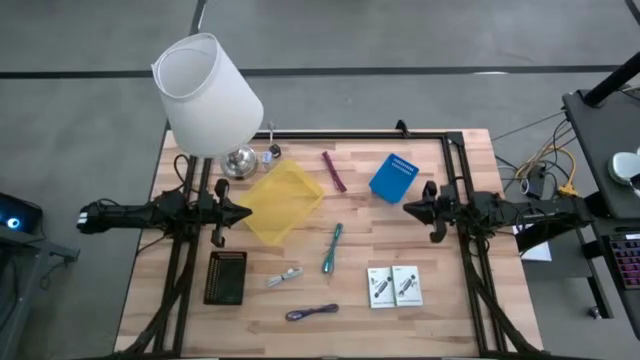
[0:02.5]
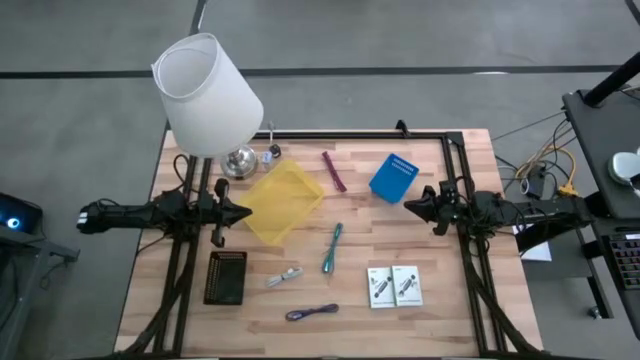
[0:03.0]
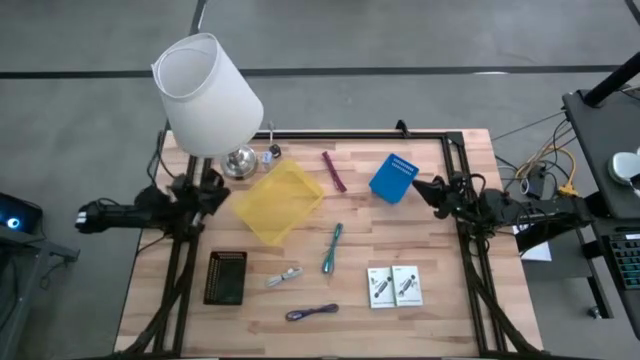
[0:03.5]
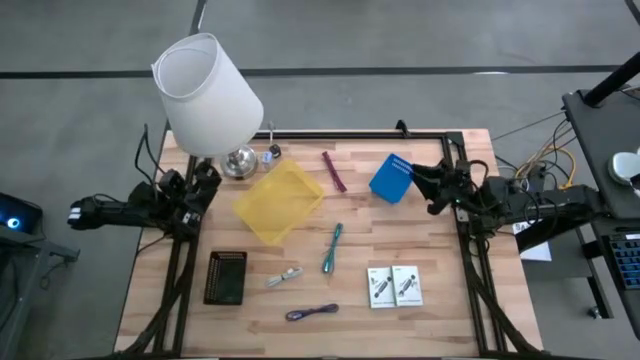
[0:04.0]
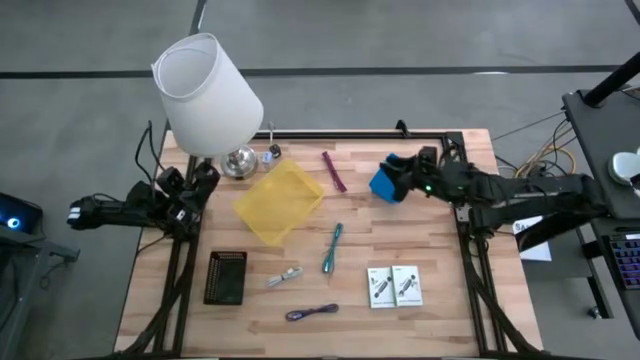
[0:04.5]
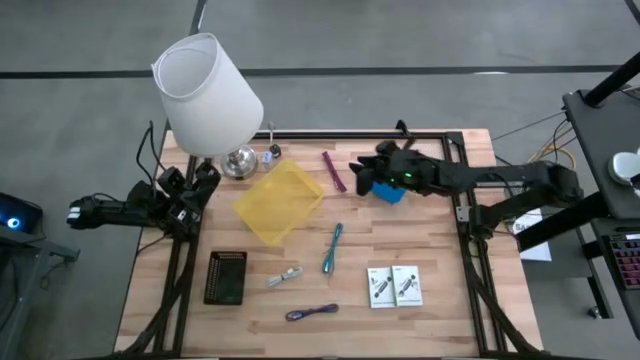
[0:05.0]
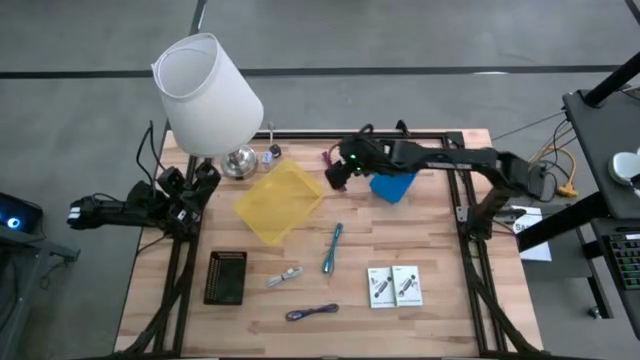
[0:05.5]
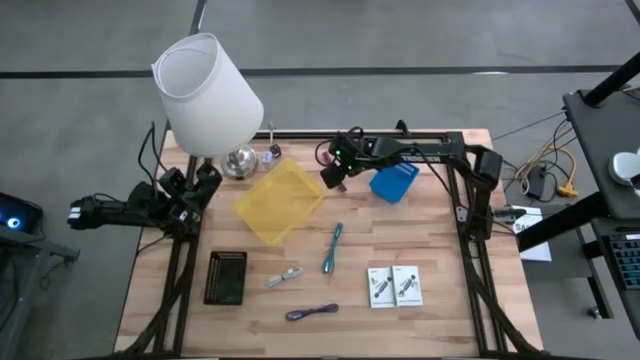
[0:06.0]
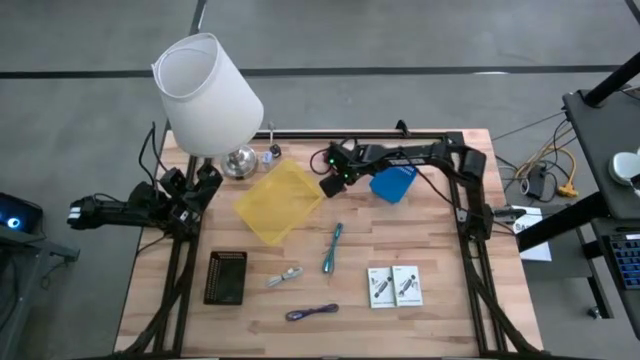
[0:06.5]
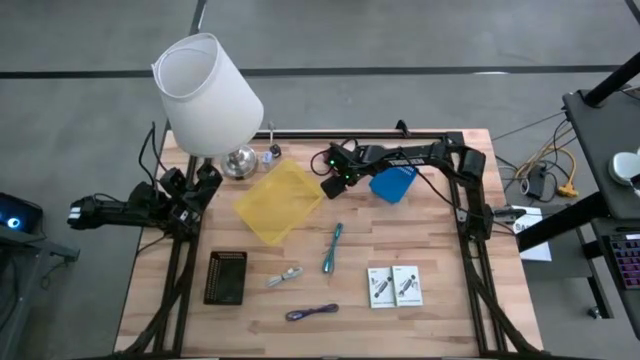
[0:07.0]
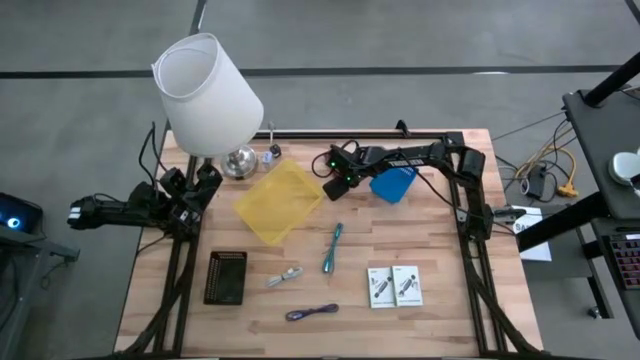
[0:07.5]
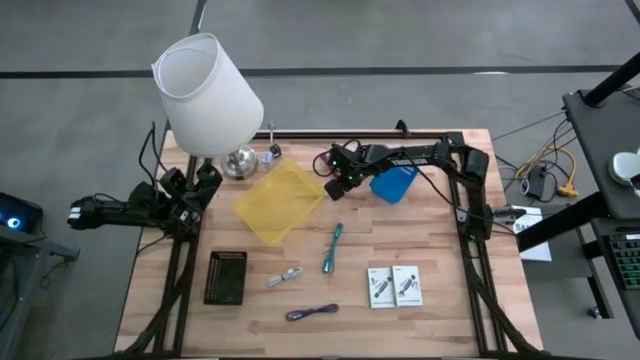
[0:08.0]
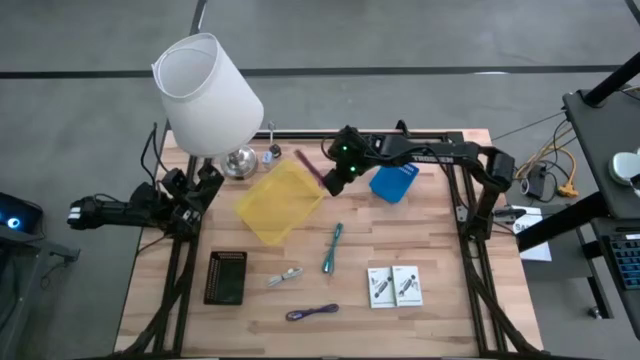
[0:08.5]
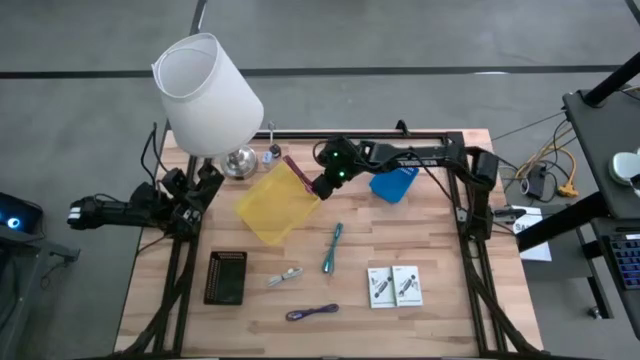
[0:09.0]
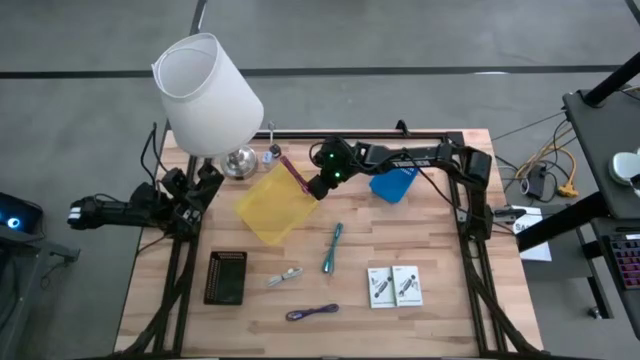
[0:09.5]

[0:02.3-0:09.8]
Task: Pick and place items into bin
Put the pink charger cable into the yellow bin

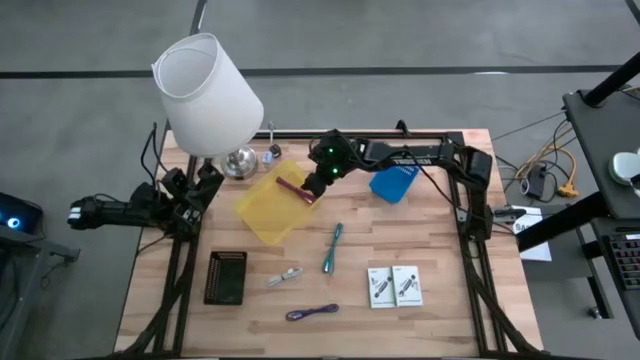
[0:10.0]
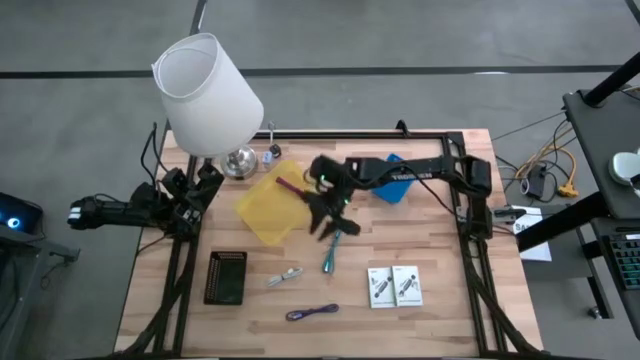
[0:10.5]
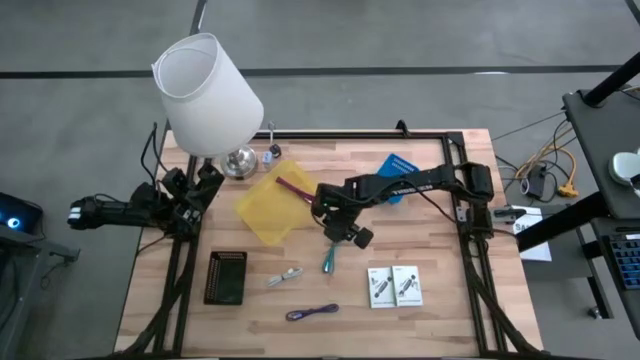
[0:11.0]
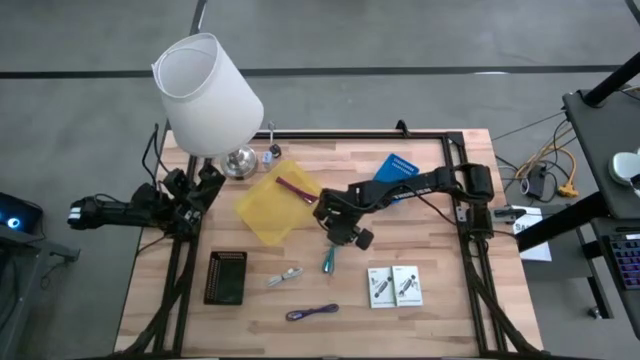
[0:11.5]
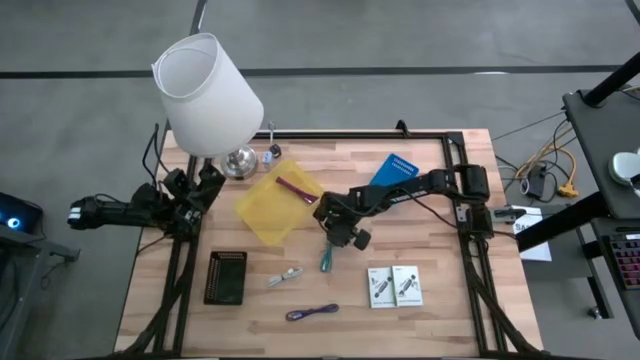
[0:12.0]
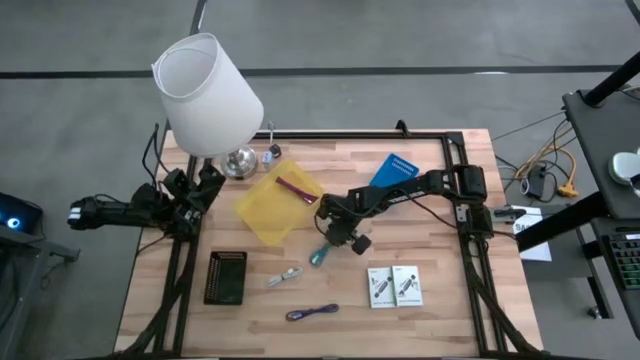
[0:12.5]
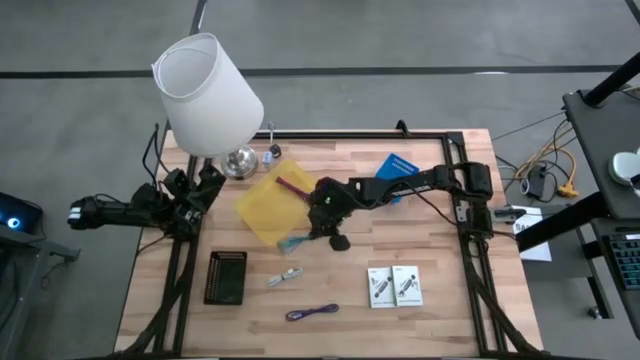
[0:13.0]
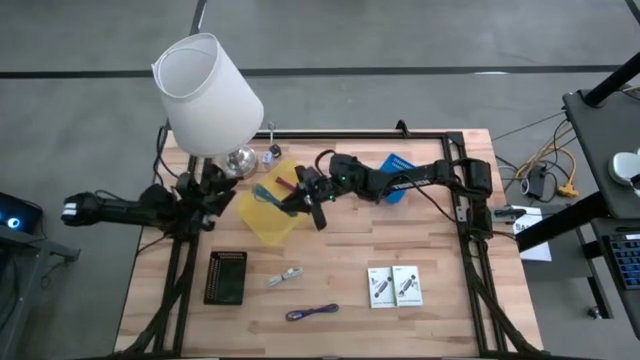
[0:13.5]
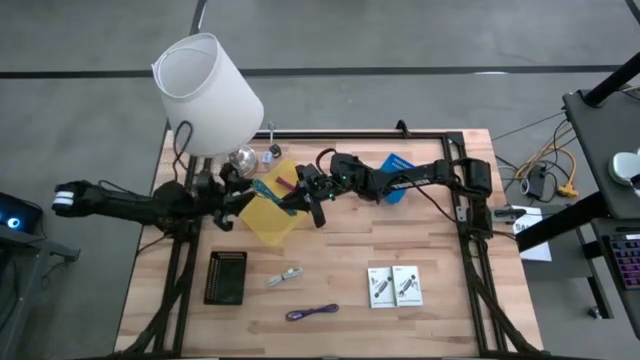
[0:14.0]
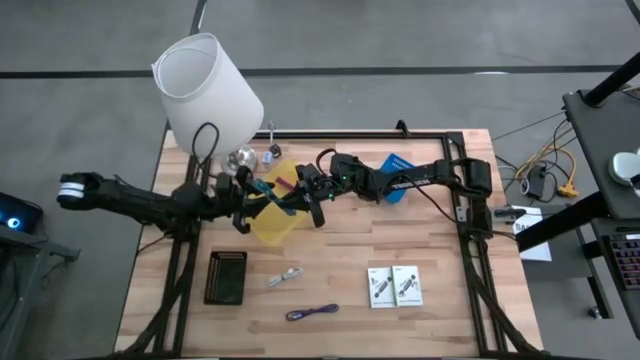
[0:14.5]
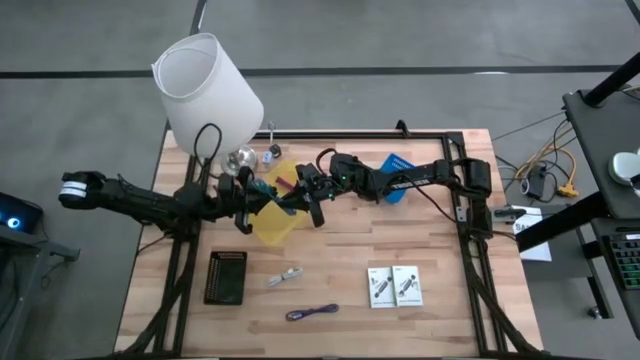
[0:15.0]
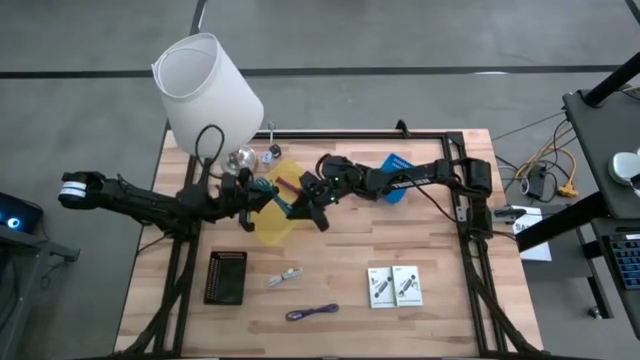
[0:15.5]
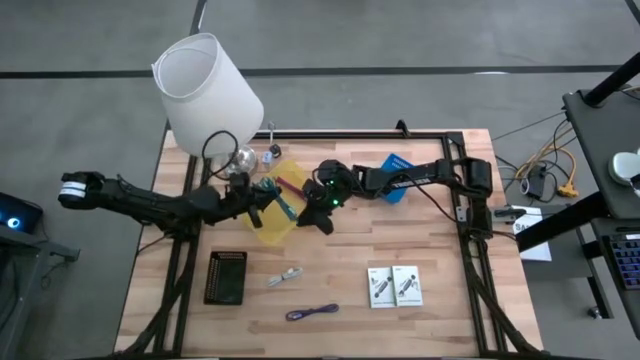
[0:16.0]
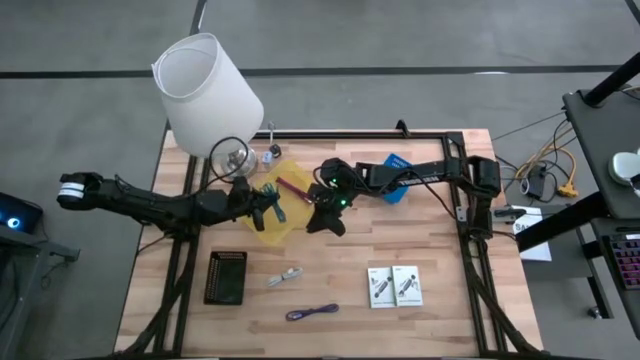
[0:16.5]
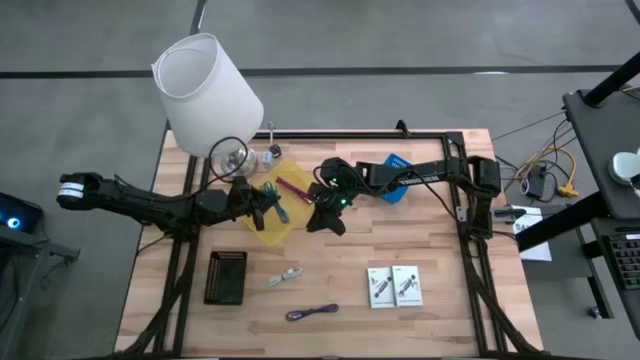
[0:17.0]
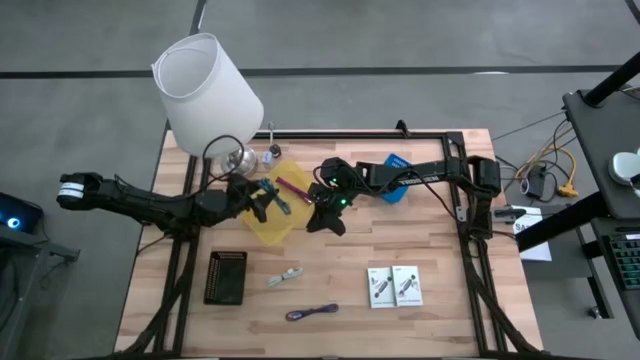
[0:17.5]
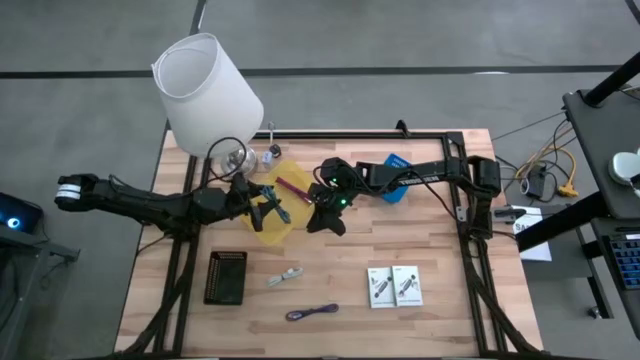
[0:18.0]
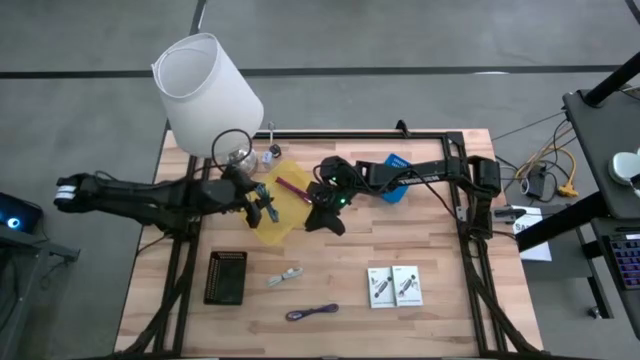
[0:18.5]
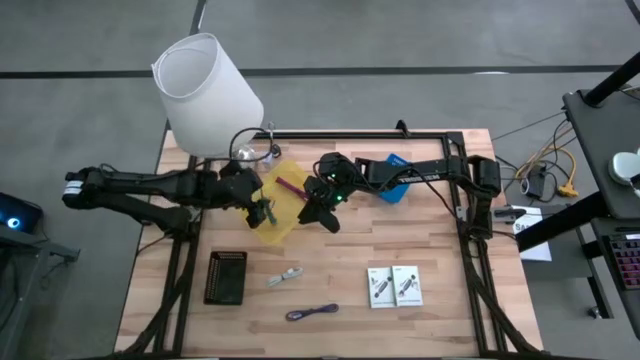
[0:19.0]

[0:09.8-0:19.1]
Put the light blue charger cable into the yellow bin

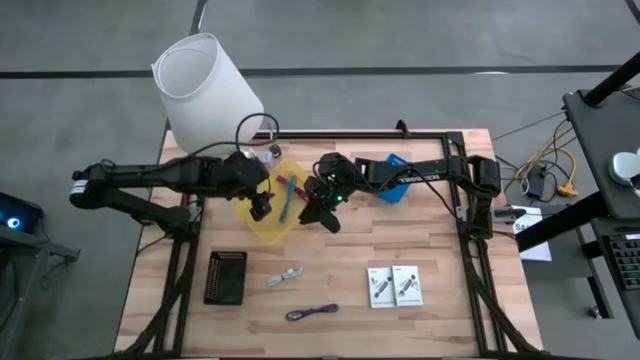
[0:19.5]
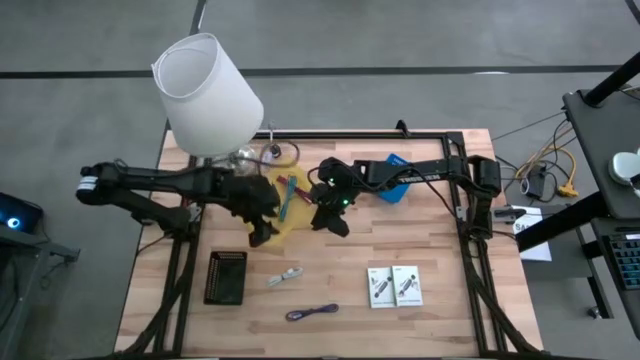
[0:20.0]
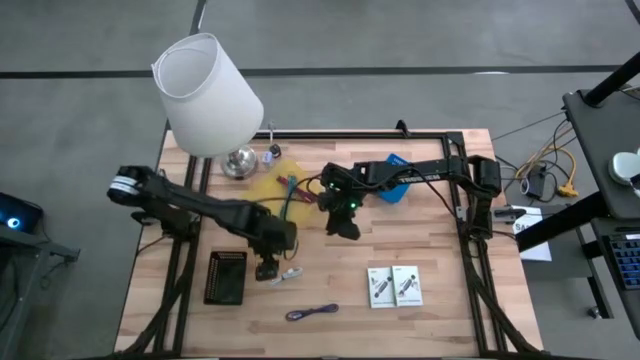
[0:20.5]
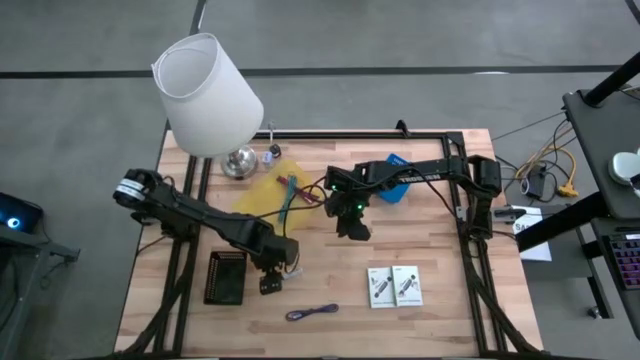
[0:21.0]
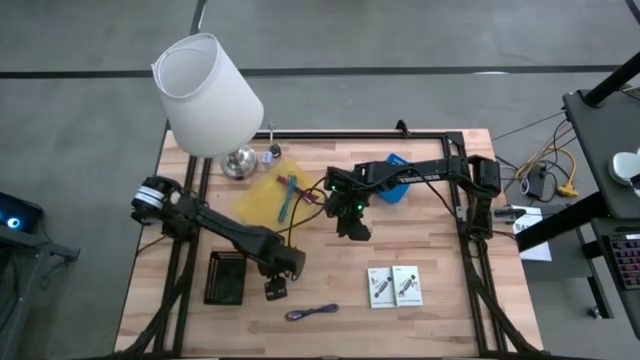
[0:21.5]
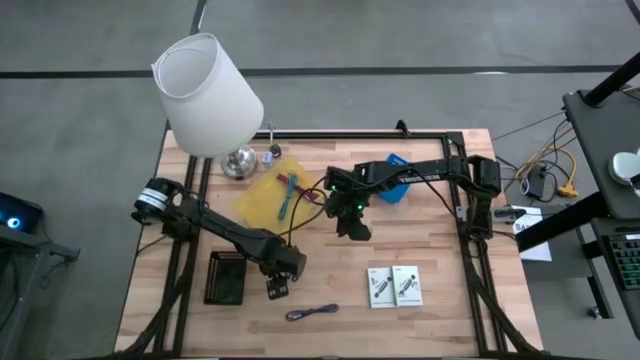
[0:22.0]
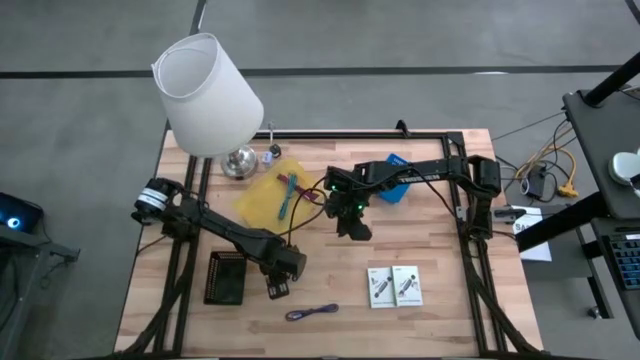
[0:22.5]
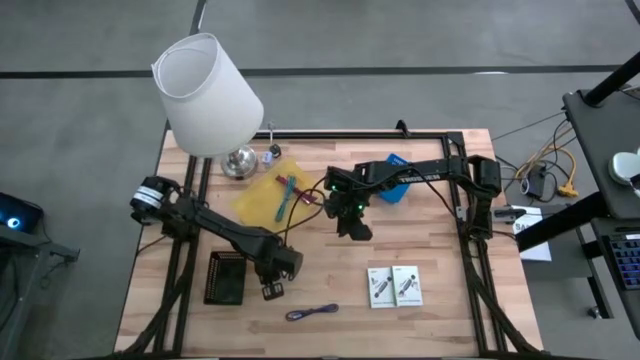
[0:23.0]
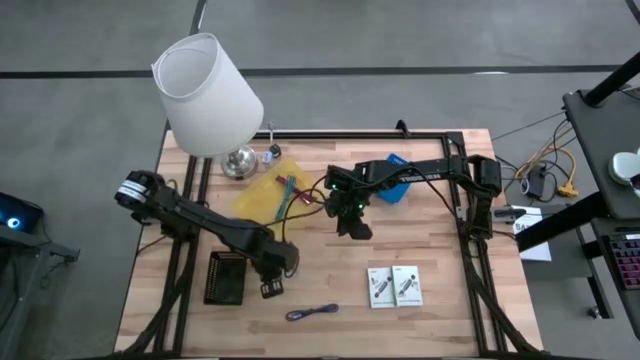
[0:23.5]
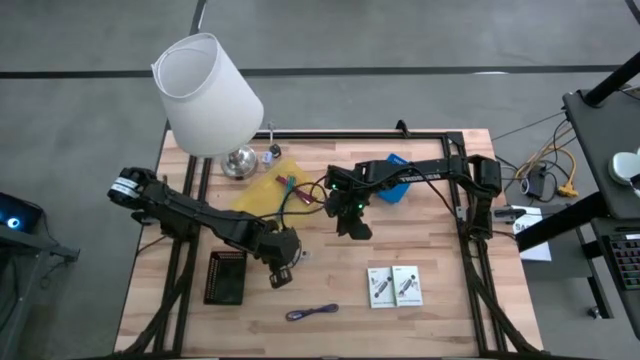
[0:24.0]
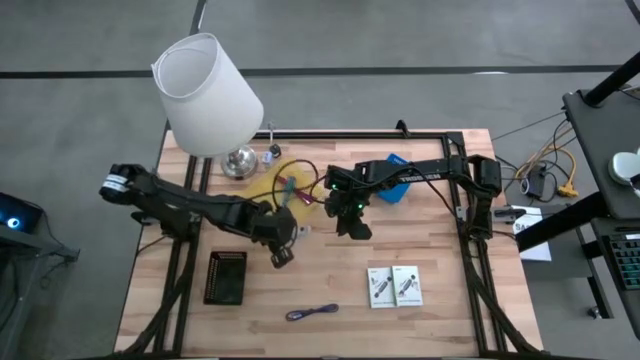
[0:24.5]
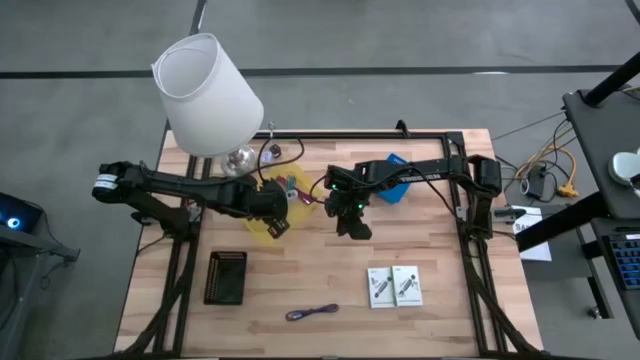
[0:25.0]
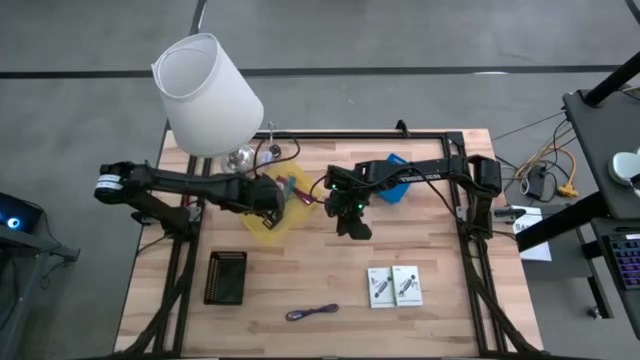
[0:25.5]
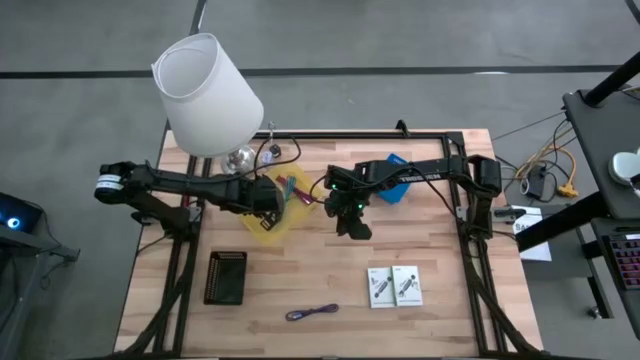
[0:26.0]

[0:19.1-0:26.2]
Put the white charger cable into the yellow bin
